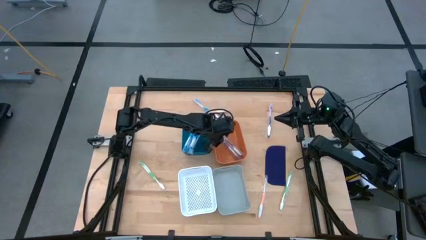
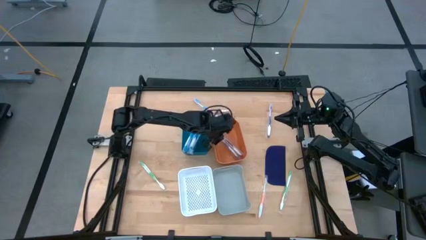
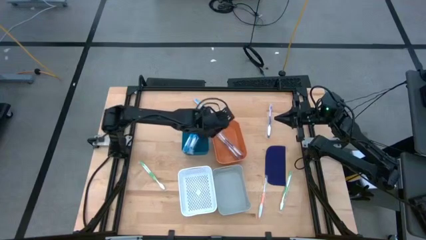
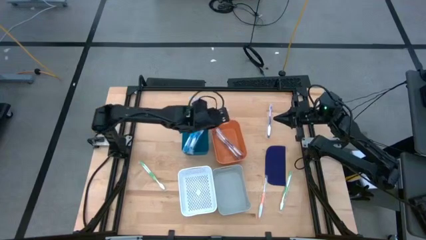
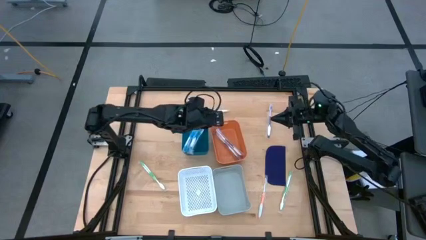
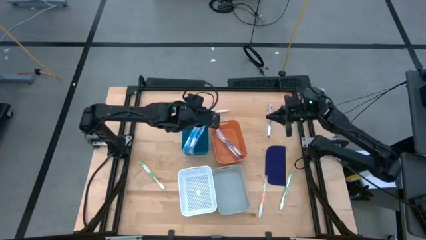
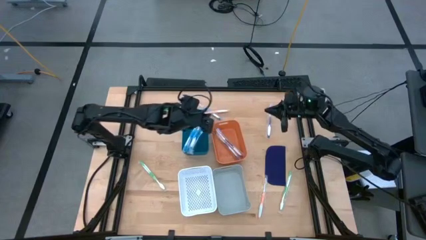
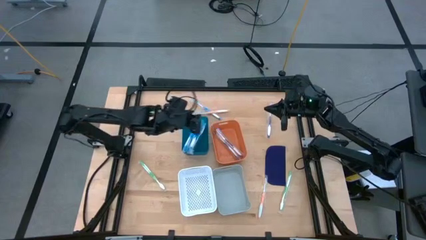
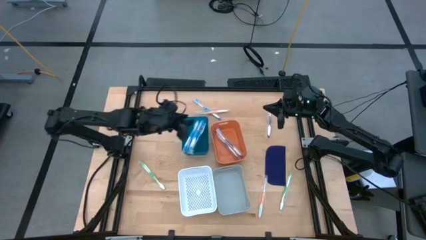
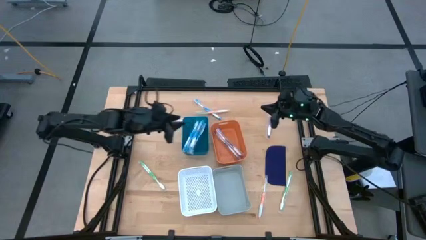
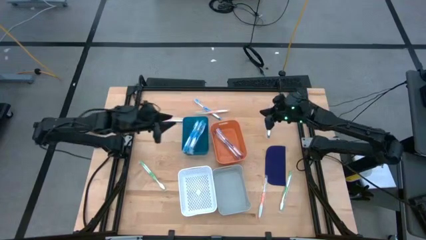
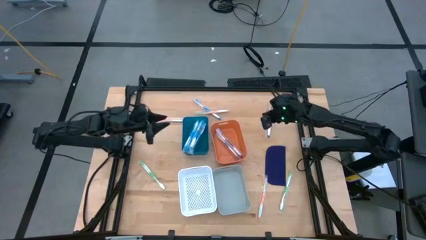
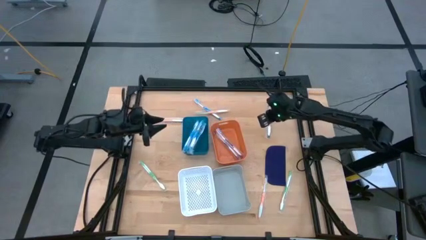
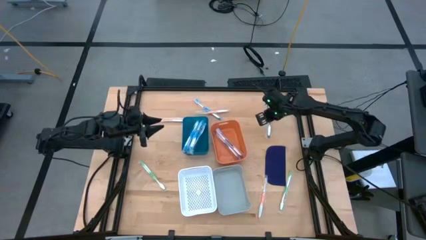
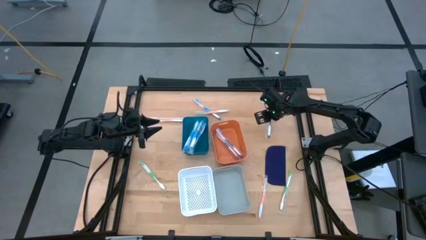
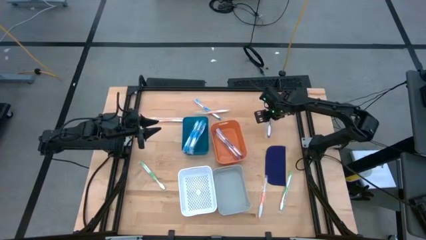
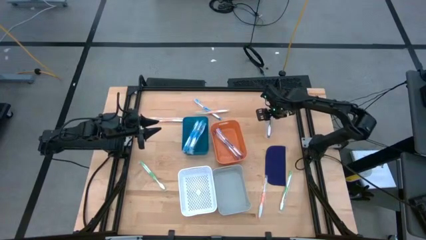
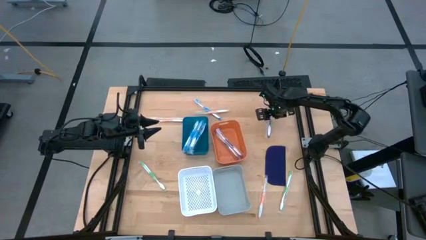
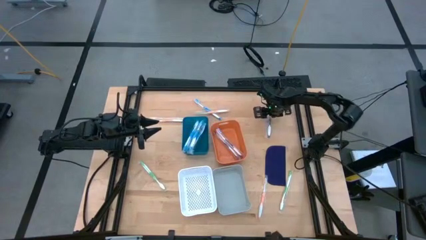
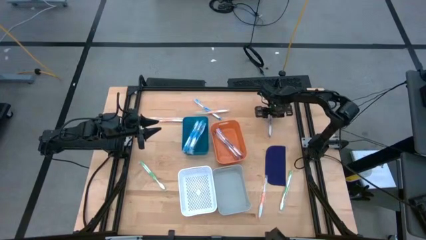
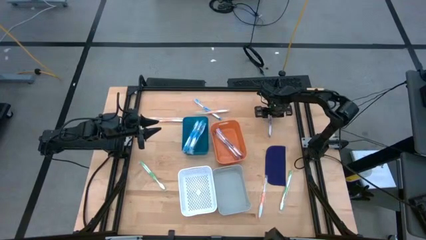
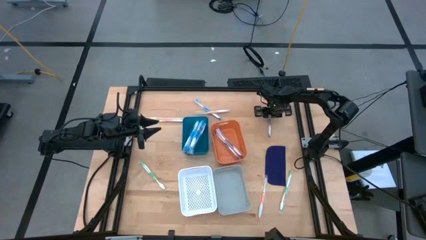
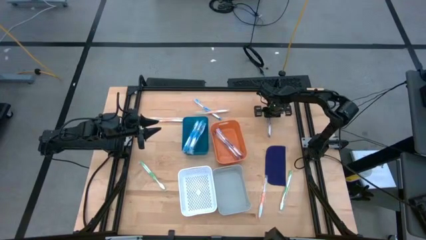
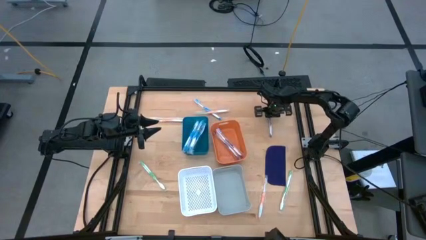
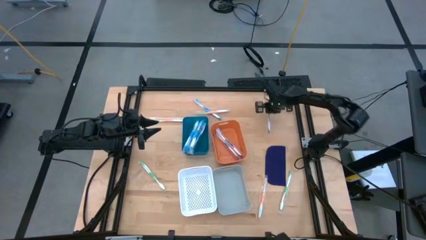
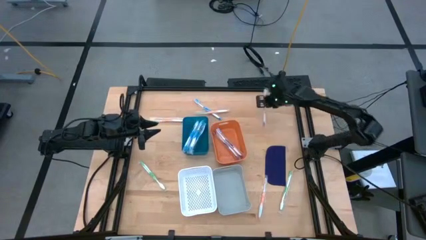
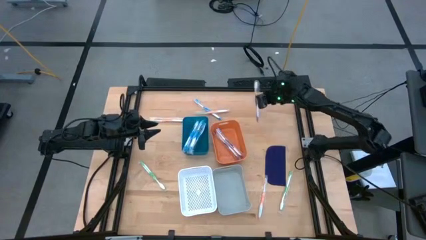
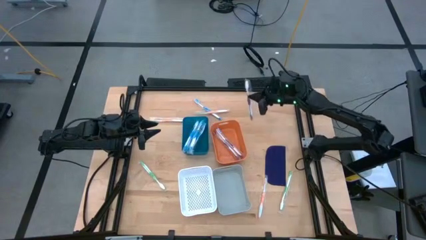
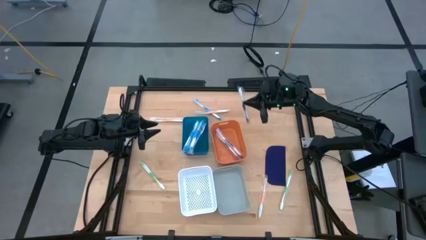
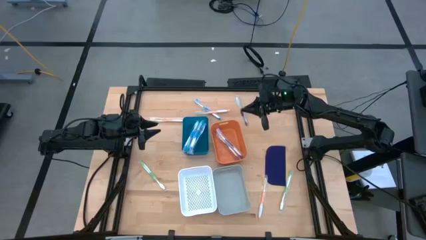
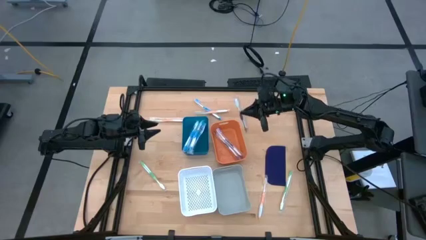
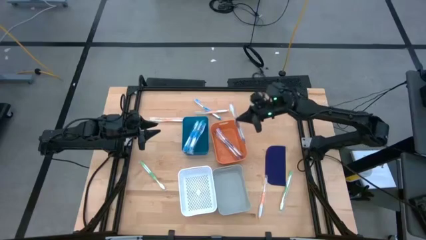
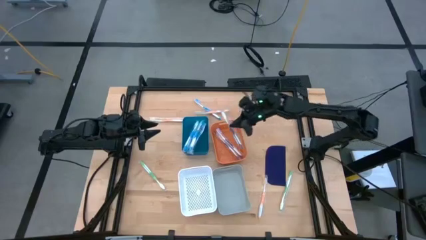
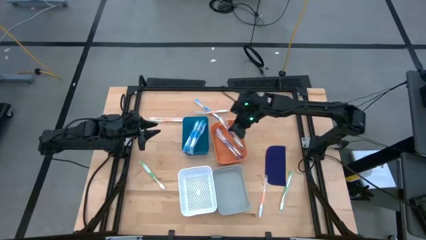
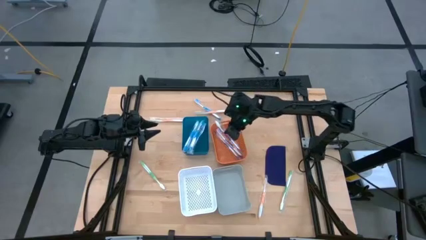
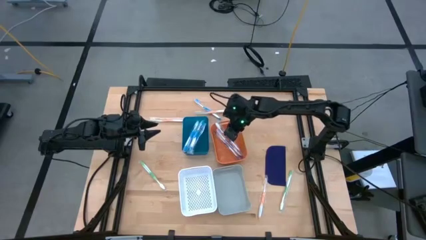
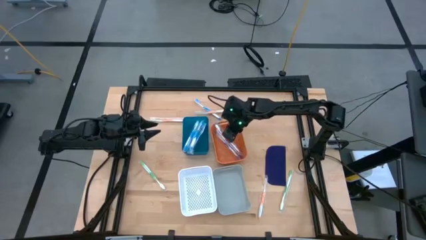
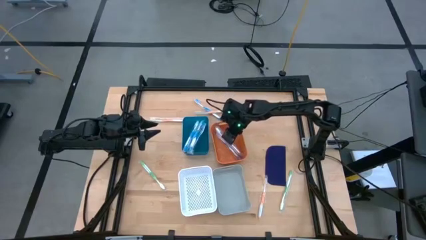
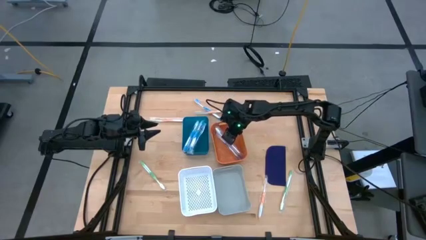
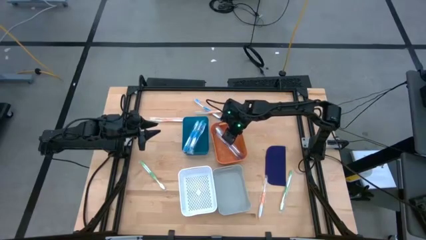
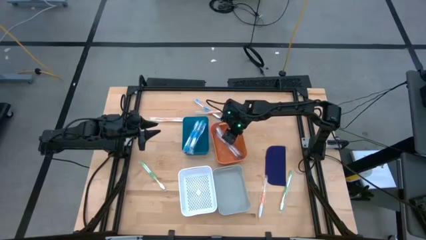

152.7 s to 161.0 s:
Task: Pick & Place Toothbrushes
Put the violet toothbrush into the orange bin

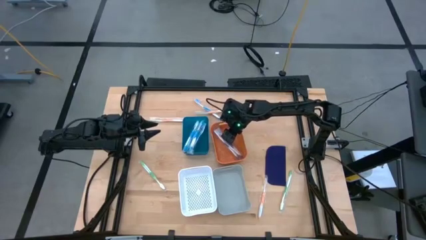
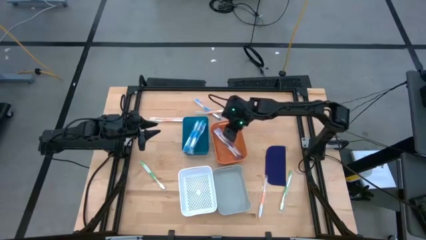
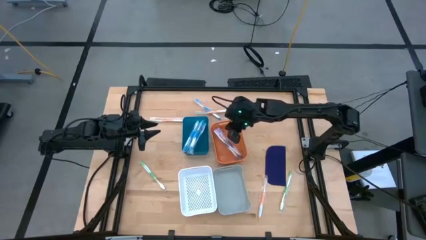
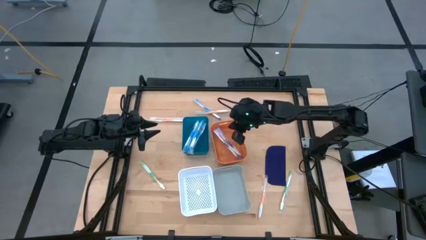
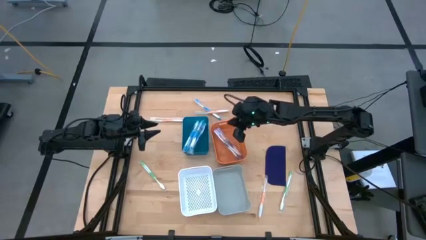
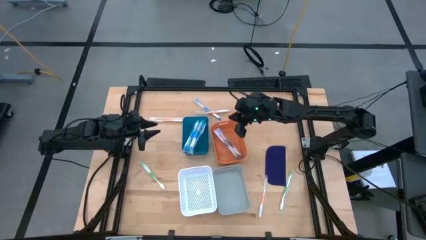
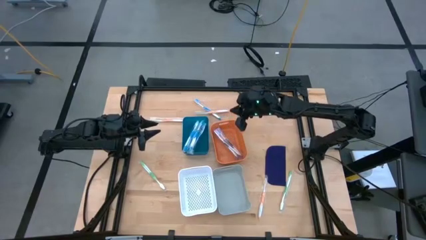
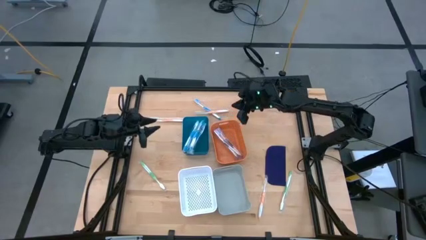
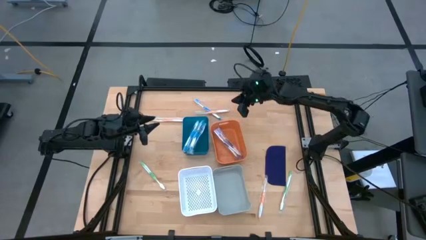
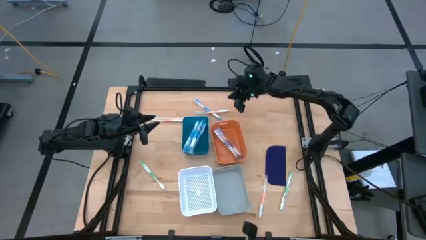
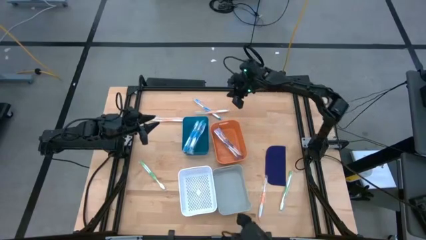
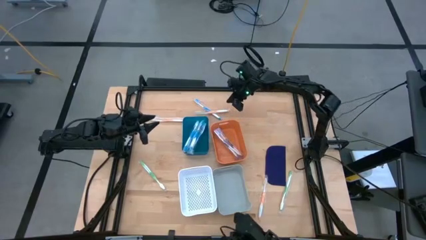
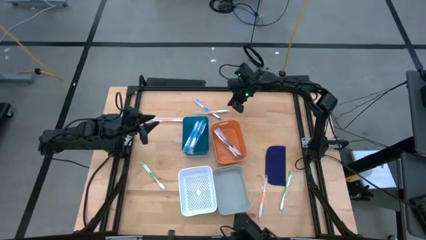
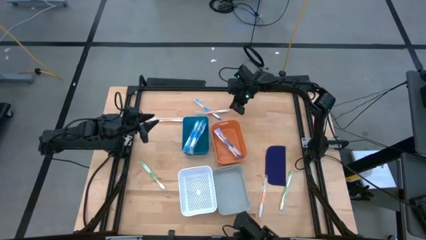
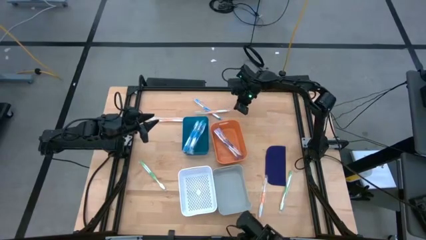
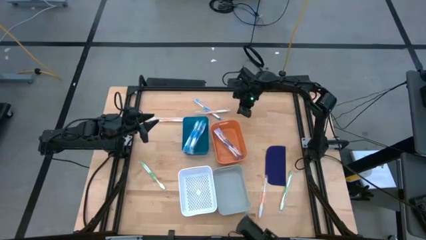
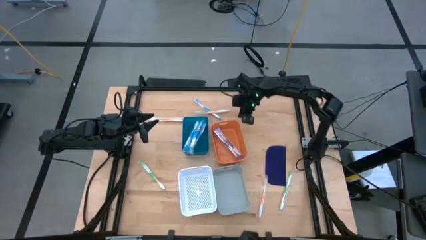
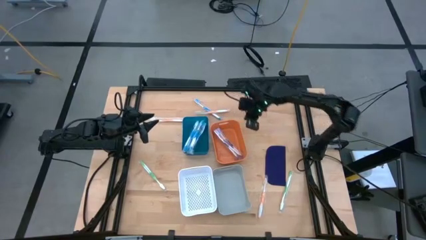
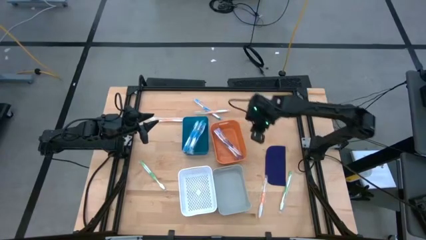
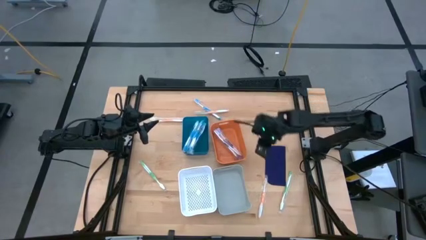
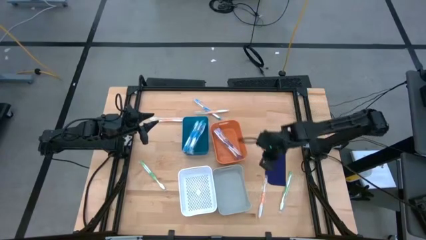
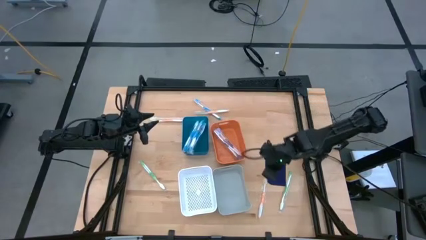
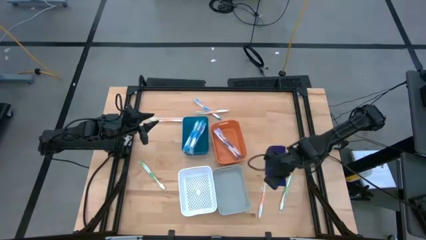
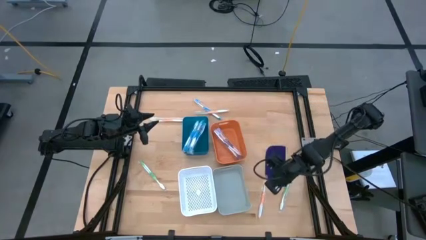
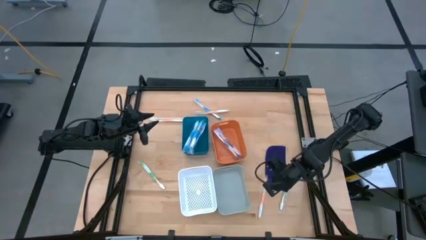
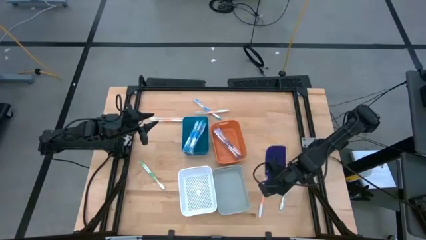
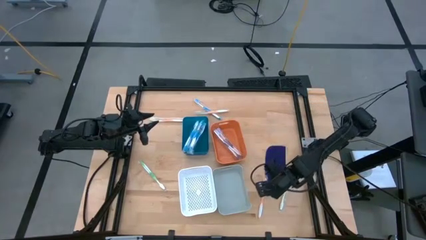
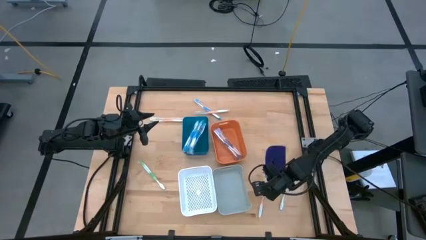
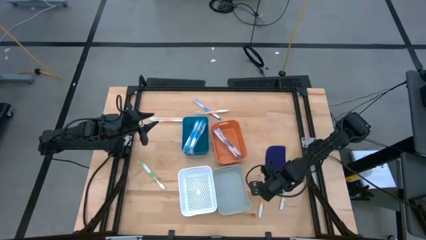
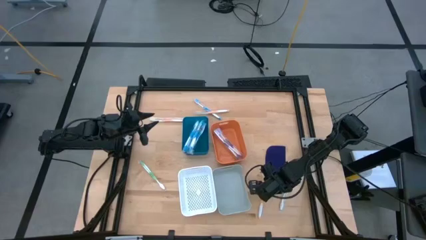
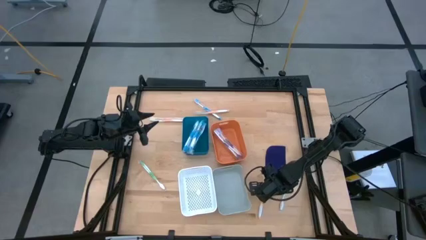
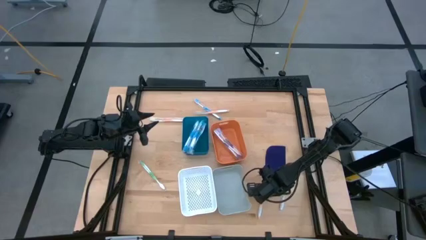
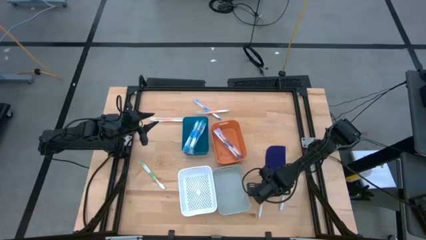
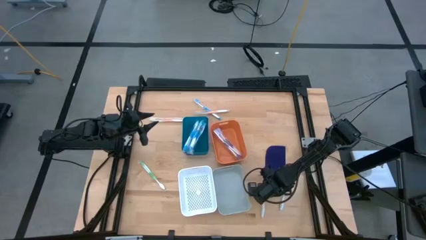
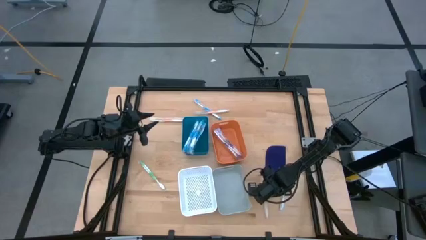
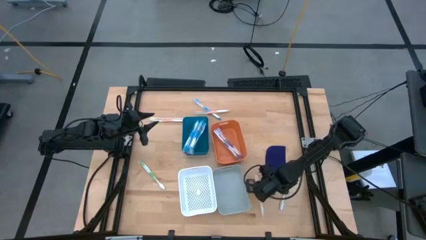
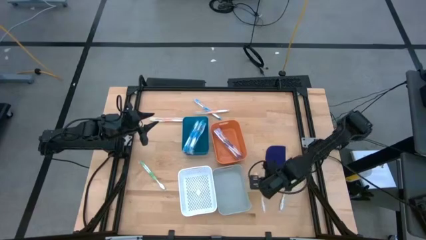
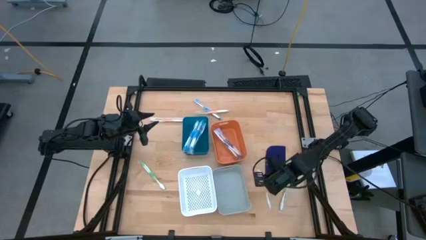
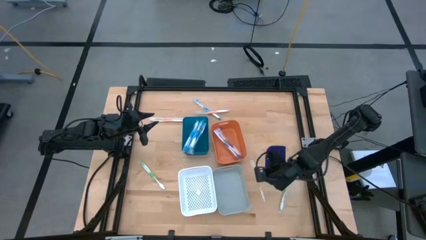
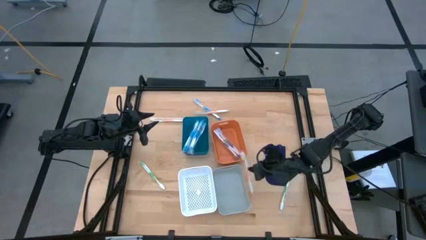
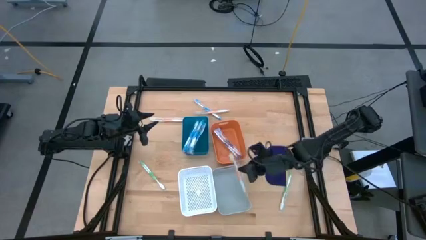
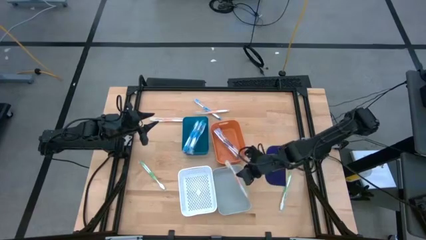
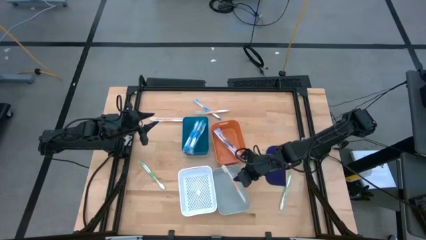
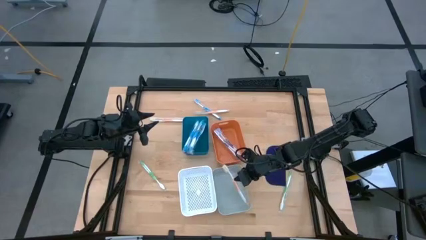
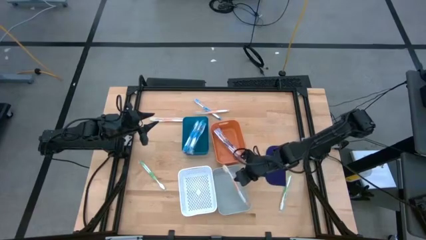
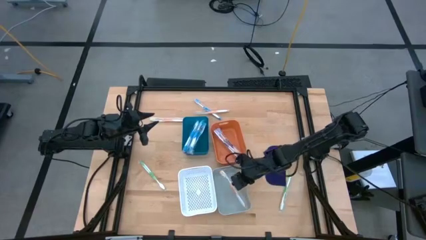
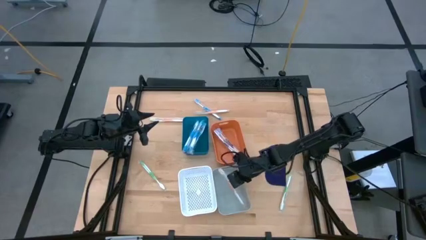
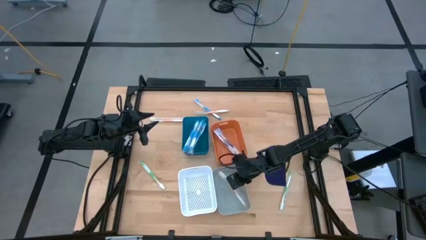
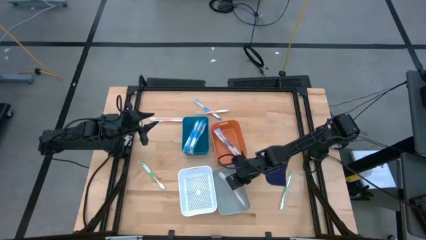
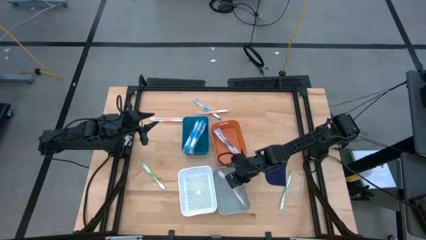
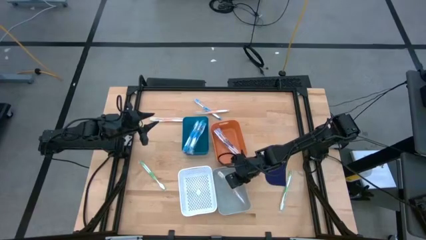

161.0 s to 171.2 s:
Put the orange toothbrush into the gray bin
